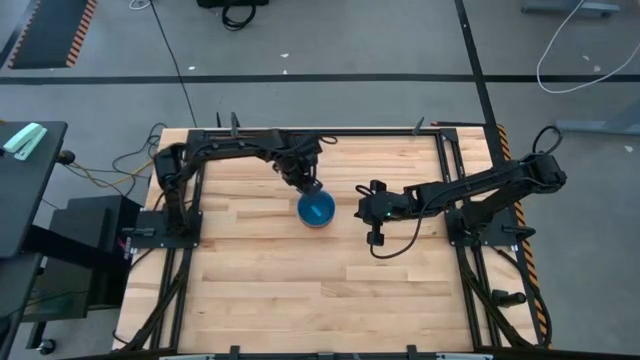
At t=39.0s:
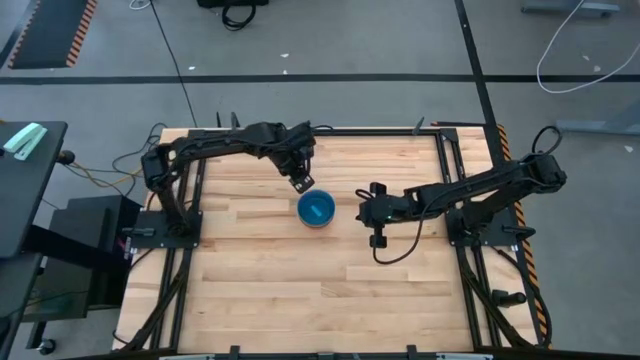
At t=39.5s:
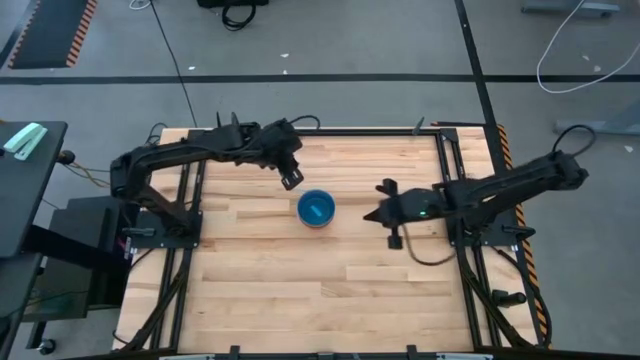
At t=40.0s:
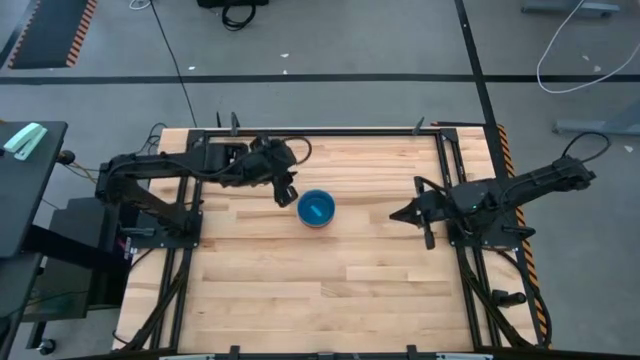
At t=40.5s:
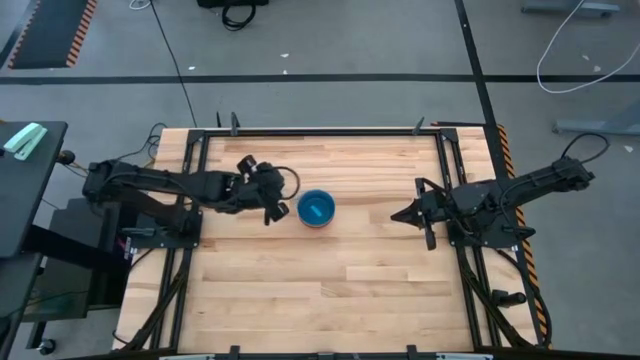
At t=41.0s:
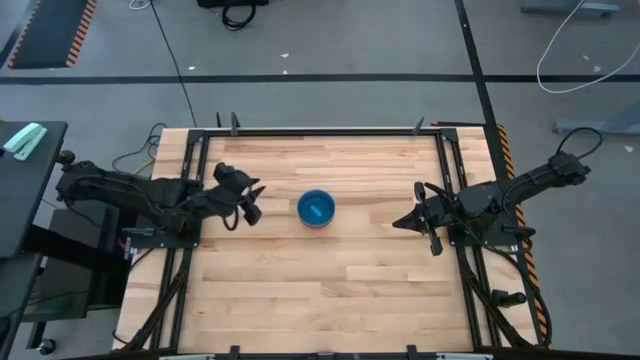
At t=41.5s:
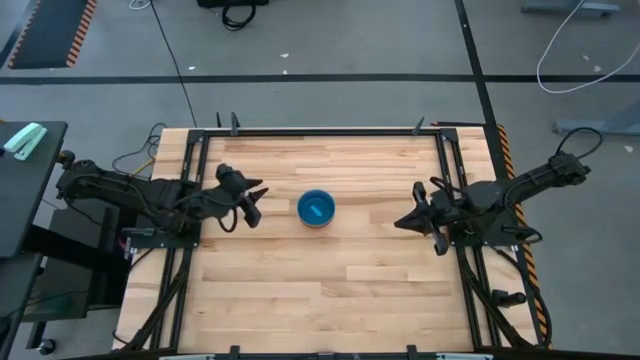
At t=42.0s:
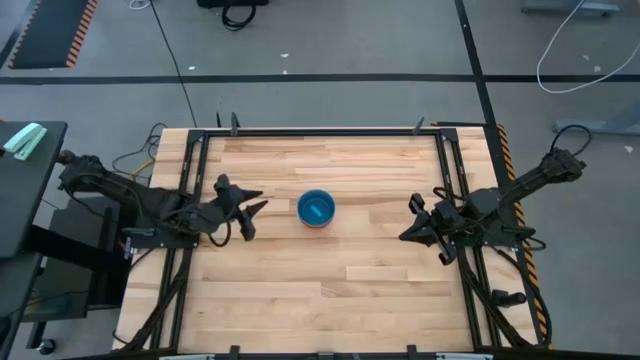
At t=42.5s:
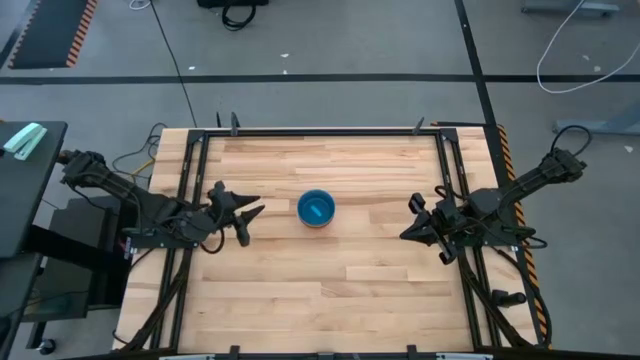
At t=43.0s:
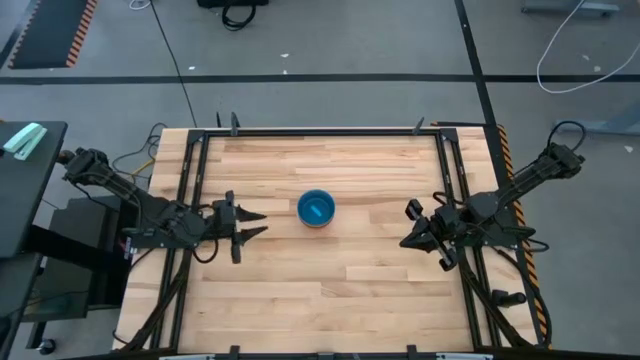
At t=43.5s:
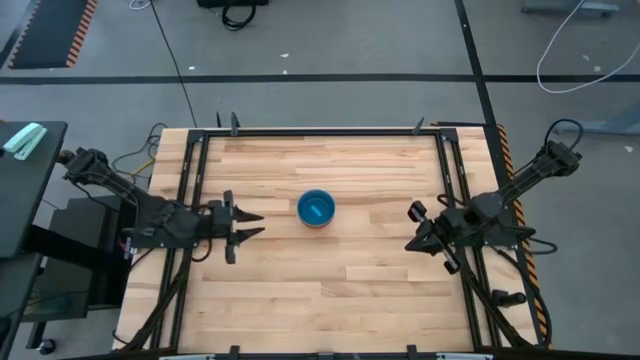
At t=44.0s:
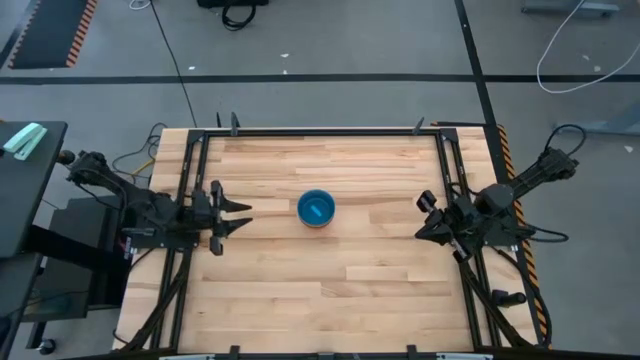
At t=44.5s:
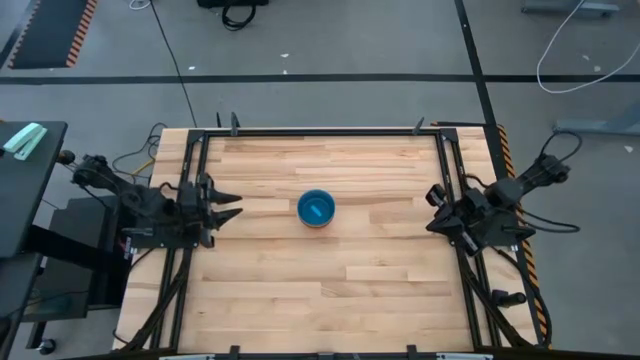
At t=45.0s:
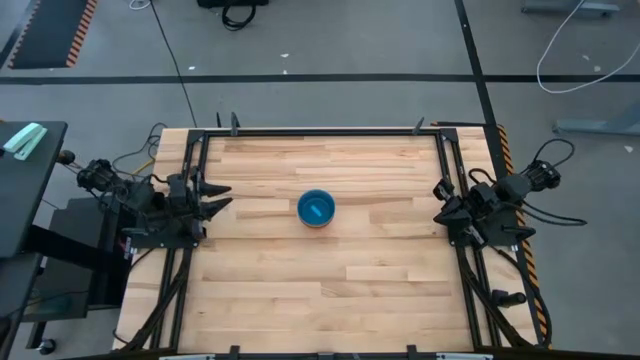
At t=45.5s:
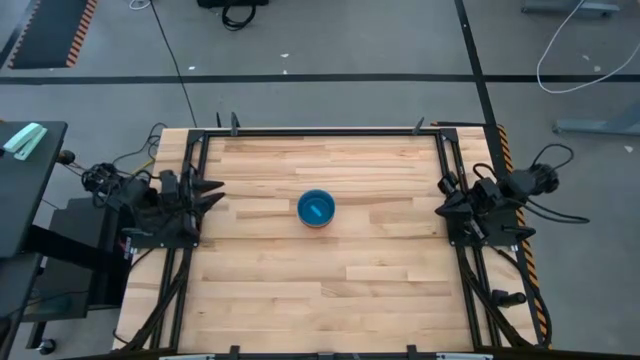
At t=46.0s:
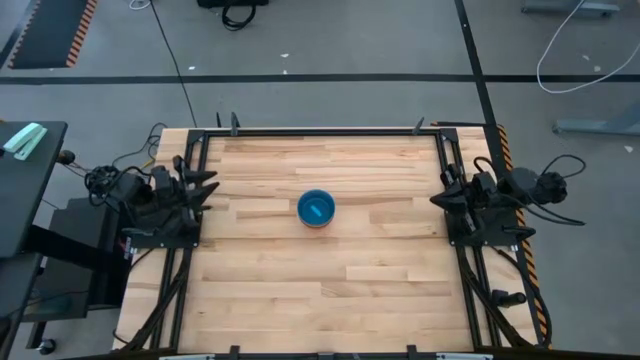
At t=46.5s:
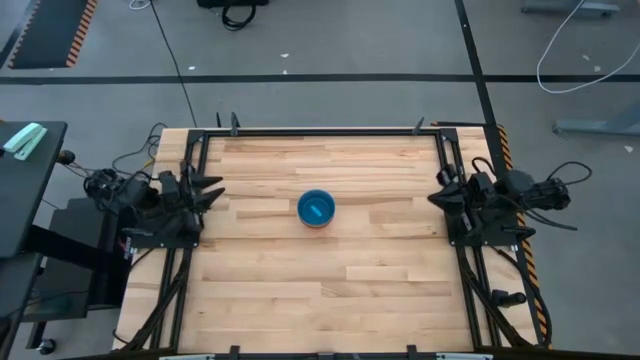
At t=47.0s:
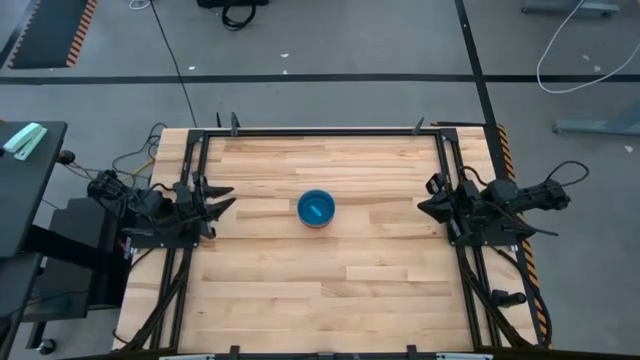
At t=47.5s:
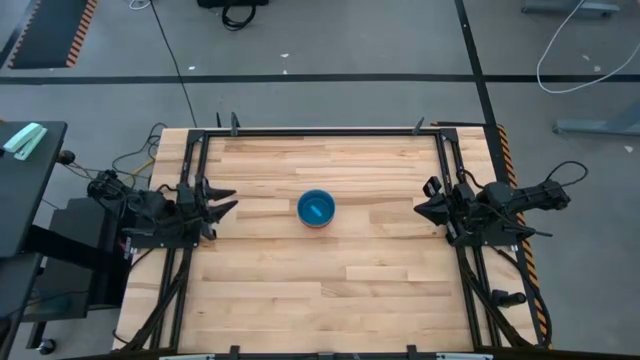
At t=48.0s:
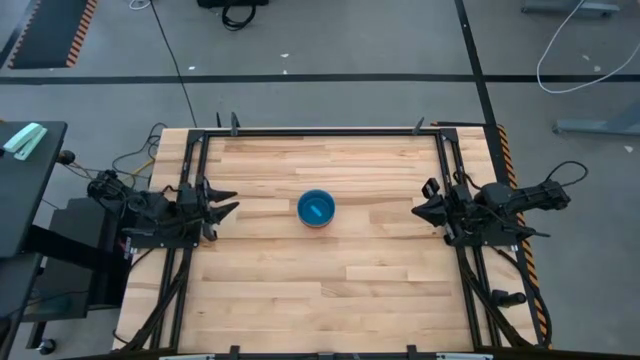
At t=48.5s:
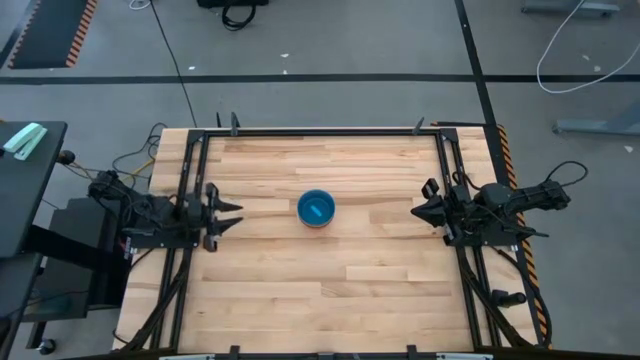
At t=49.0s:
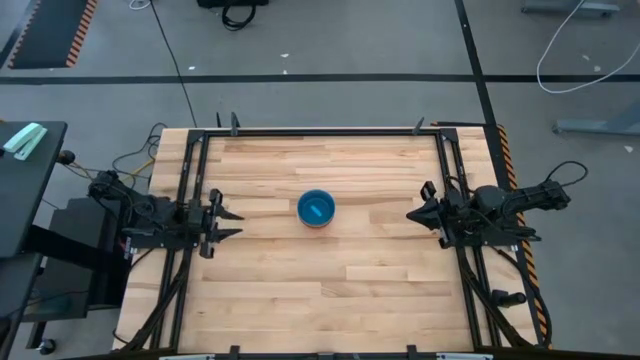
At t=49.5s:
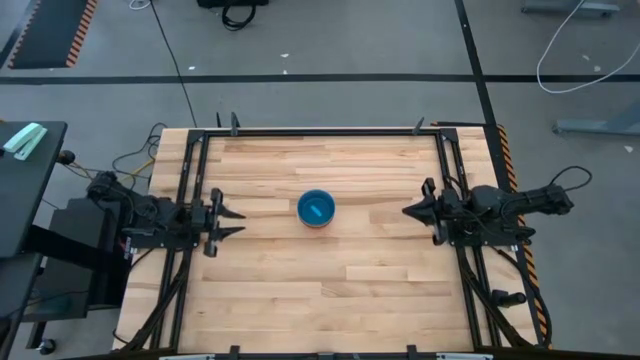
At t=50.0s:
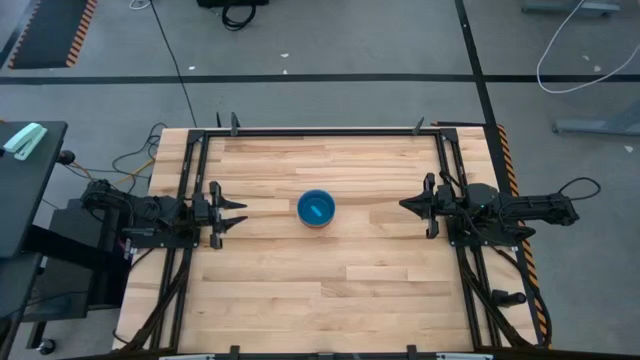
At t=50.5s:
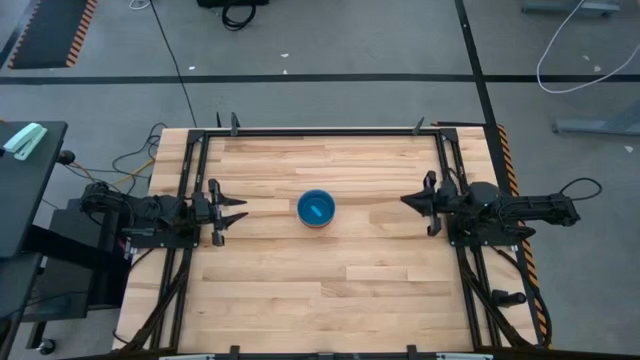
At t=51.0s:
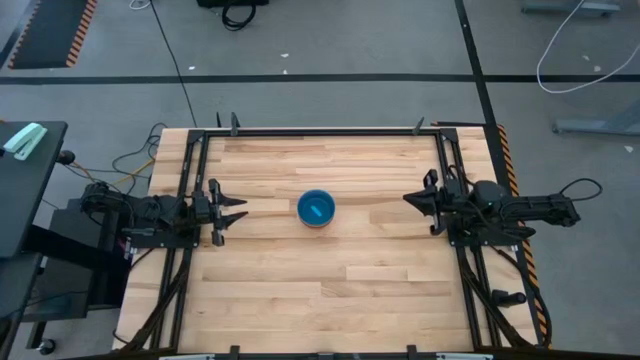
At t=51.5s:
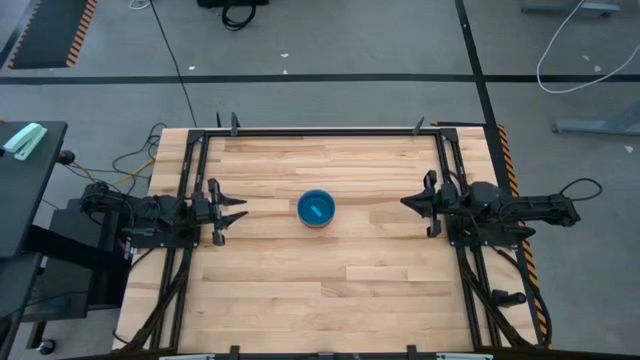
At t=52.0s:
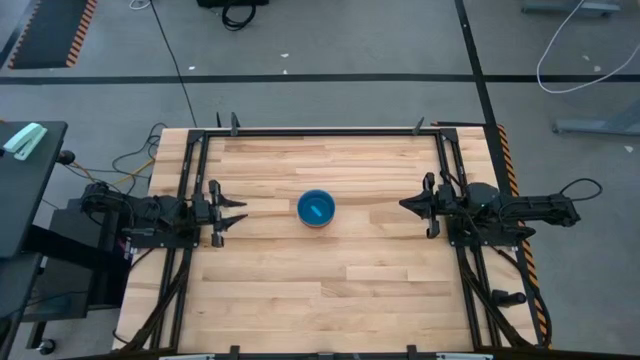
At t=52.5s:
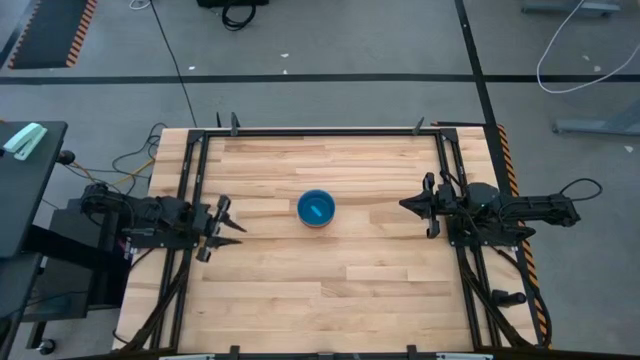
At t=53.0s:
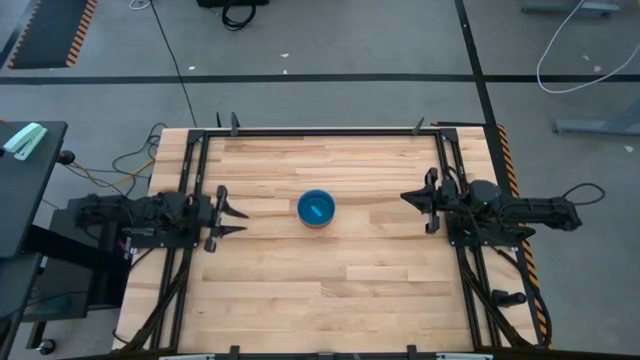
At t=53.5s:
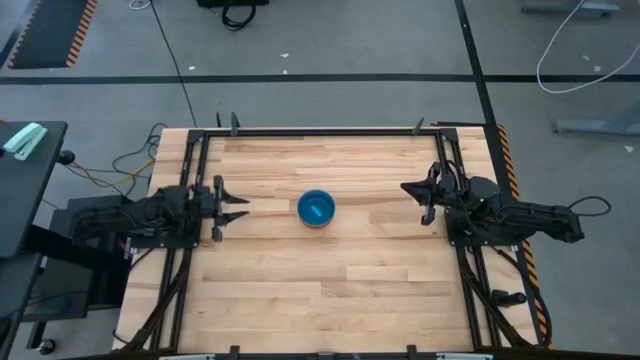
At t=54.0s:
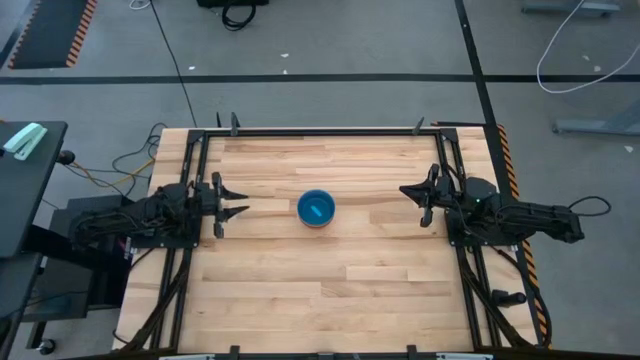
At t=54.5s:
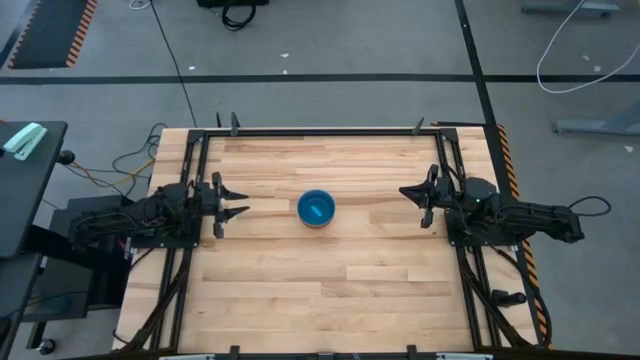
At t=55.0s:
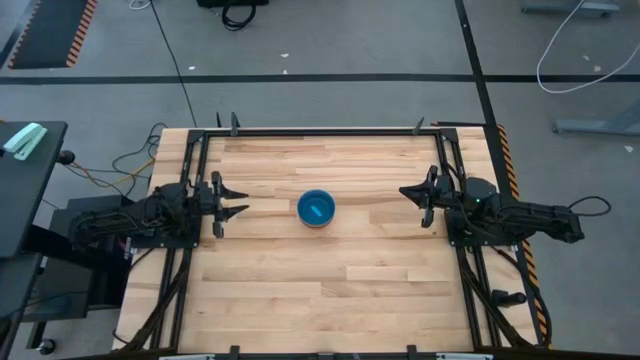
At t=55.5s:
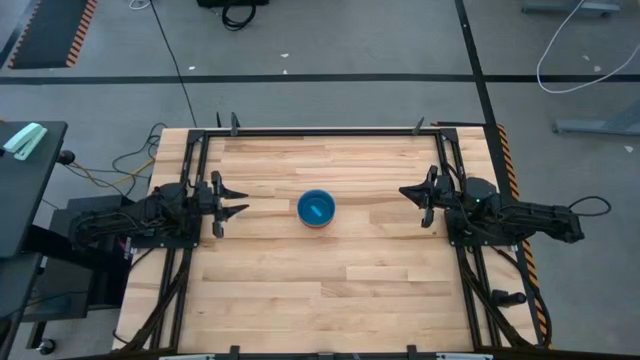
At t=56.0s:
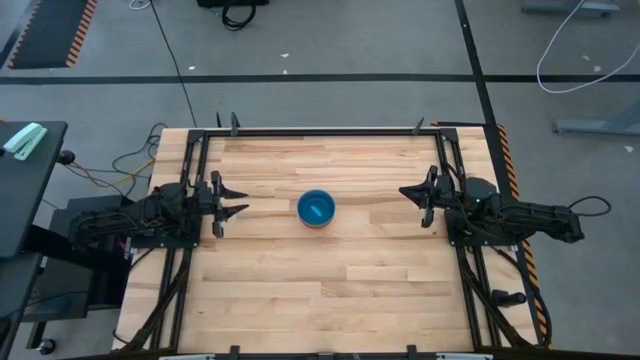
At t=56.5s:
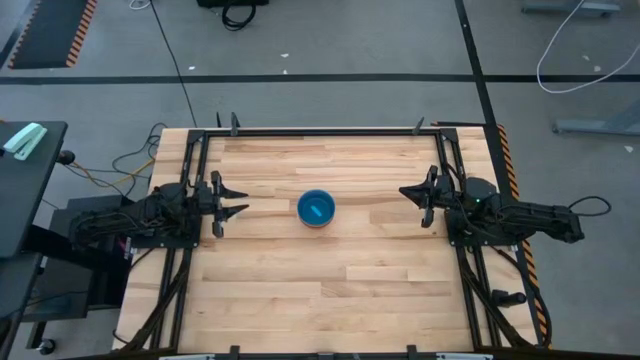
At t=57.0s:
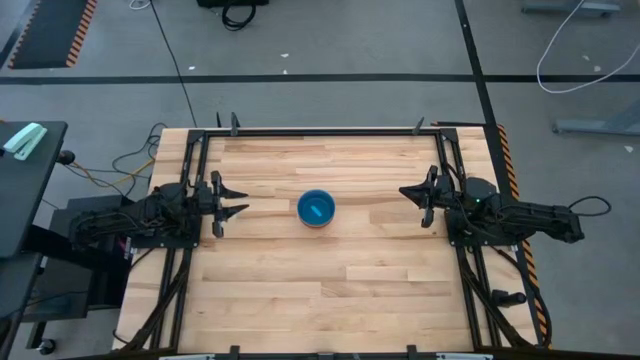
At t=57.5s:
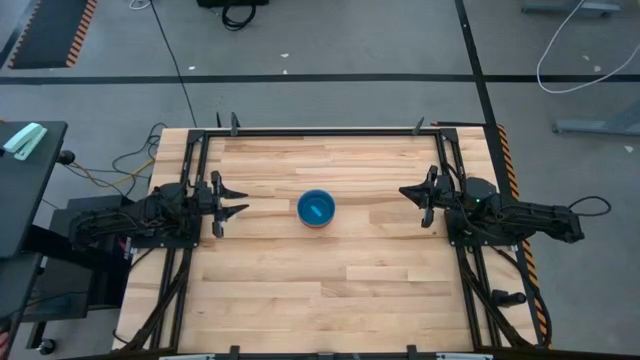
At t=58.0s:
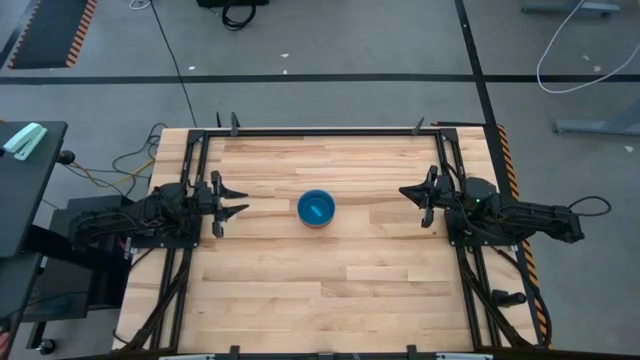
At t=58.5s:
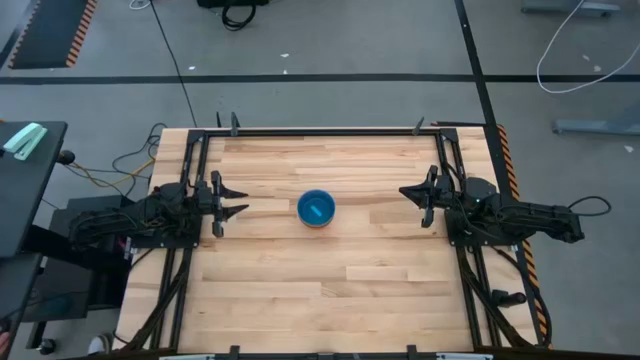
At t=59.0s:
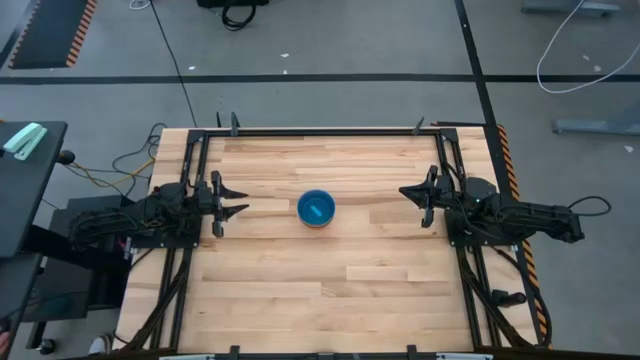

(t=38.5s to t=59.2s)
Task: Nest bowls inside each other
Return to Home Position

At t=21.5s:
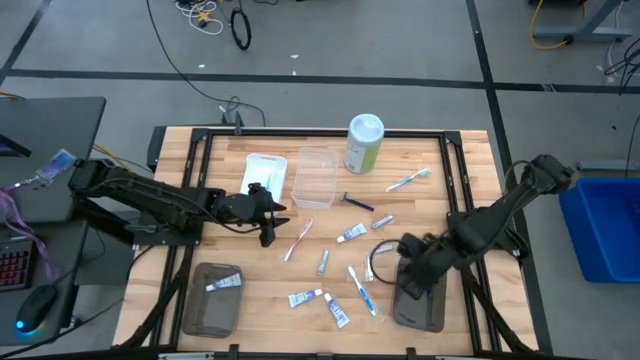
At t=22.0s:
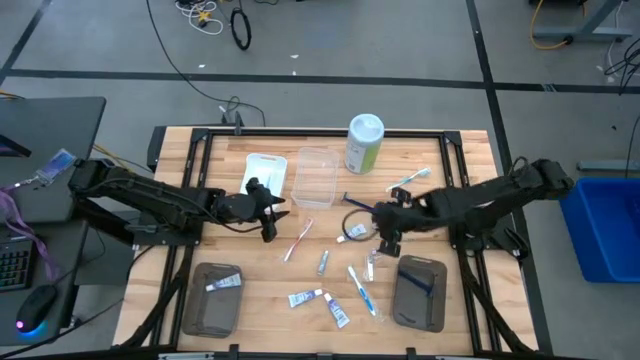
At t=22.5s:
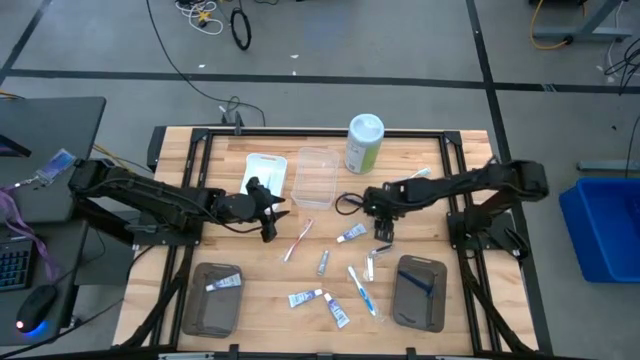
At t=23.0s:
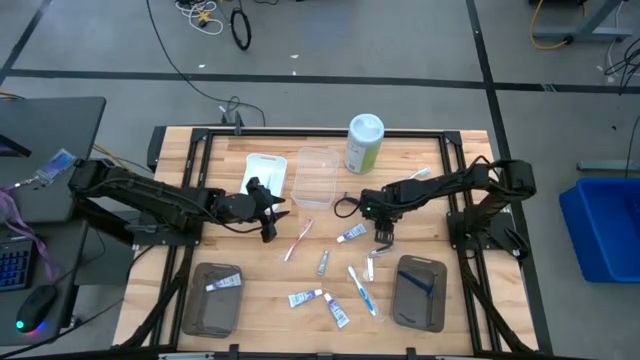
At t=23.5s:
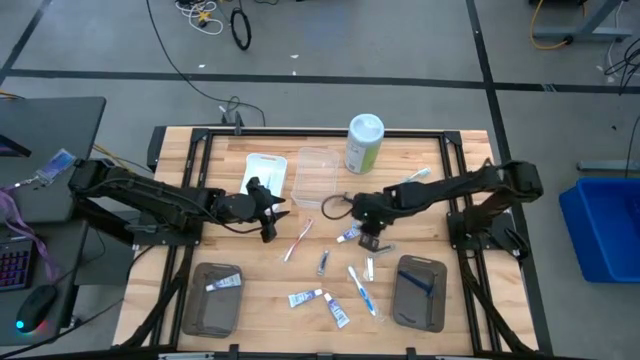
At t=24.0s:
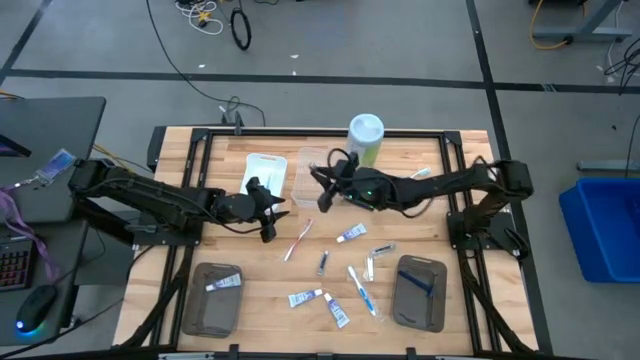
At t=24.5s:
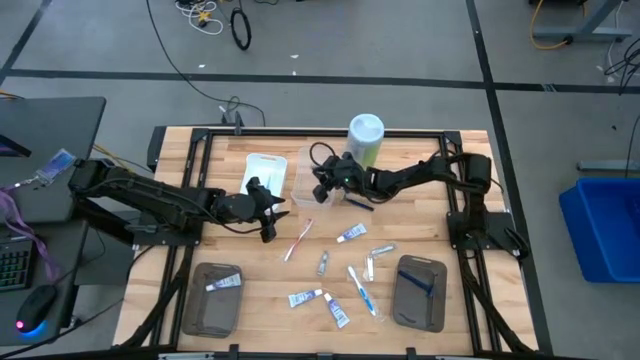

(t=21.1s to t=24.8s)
Task: Pick & Place Travel size toiletries
Put the nail cutter into the transparent bin
